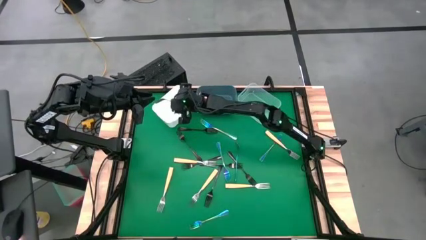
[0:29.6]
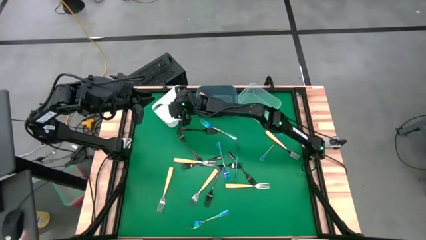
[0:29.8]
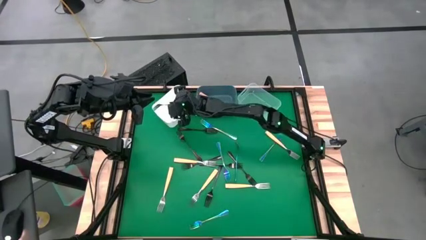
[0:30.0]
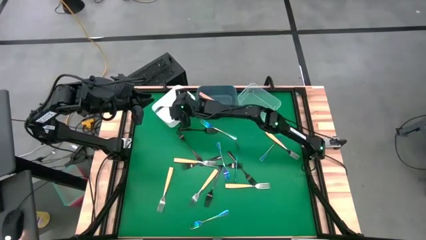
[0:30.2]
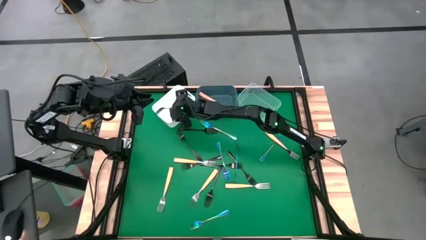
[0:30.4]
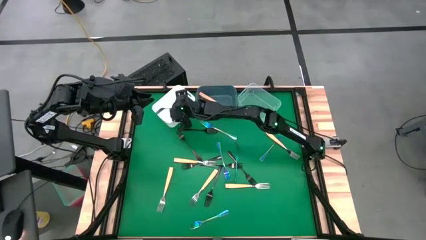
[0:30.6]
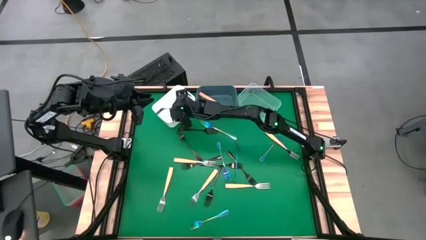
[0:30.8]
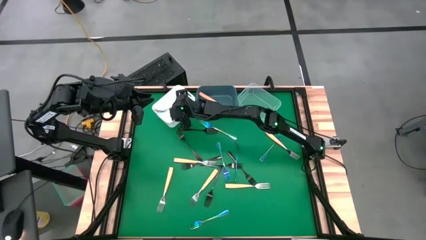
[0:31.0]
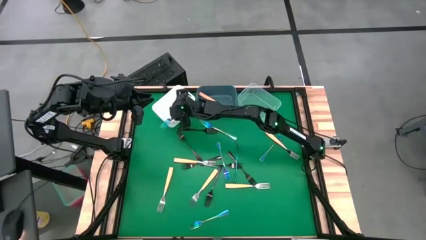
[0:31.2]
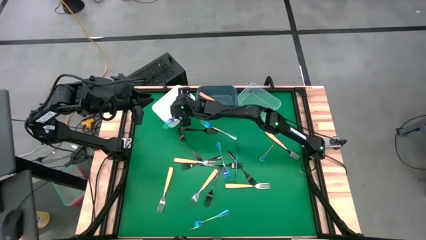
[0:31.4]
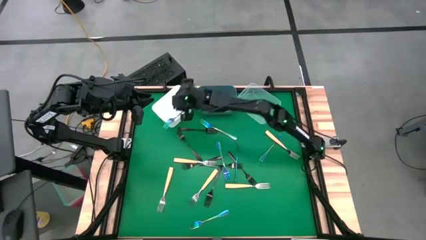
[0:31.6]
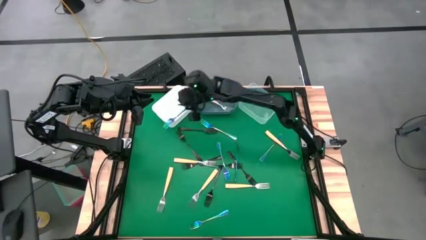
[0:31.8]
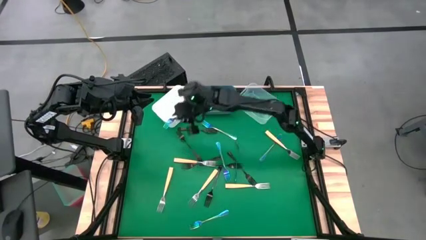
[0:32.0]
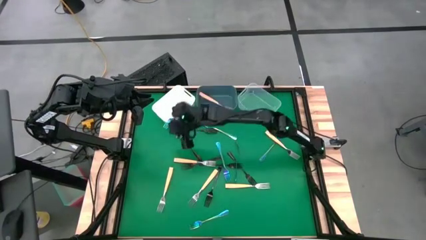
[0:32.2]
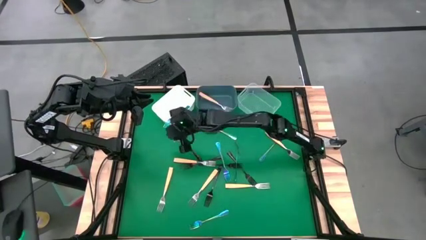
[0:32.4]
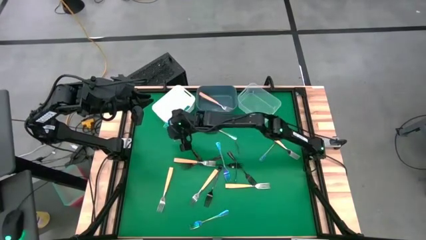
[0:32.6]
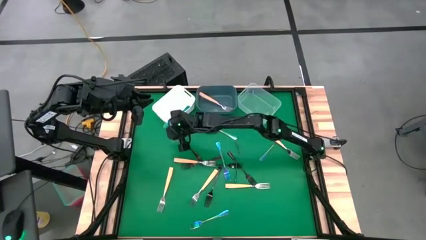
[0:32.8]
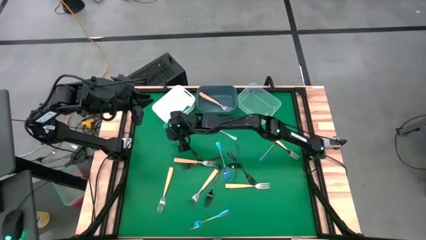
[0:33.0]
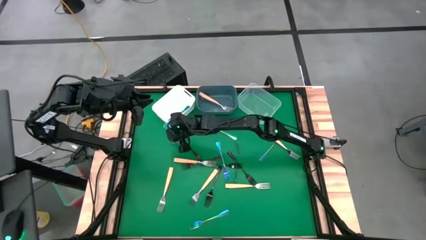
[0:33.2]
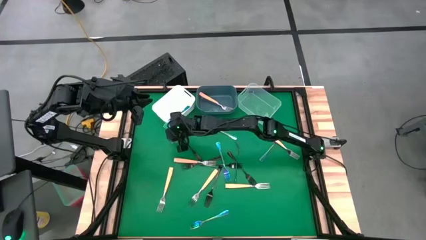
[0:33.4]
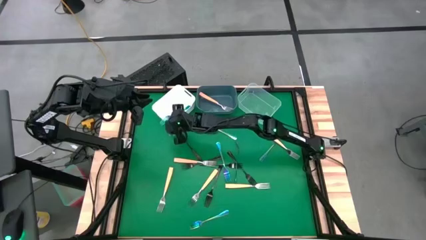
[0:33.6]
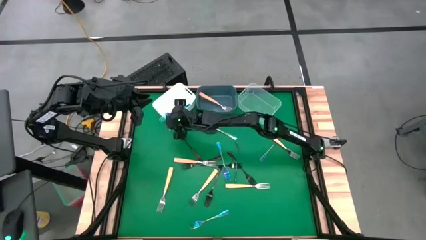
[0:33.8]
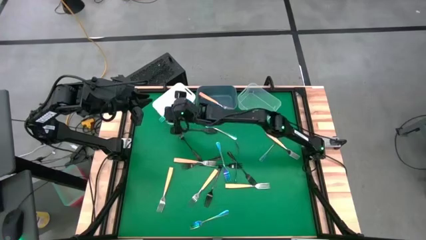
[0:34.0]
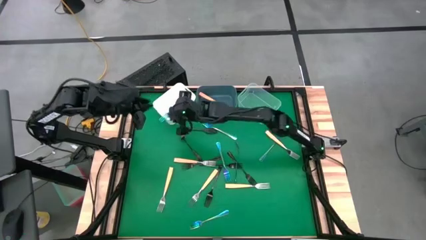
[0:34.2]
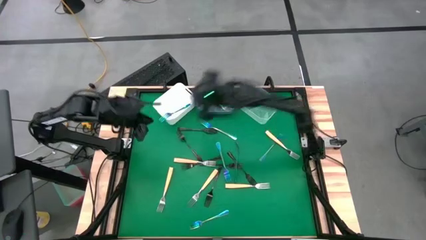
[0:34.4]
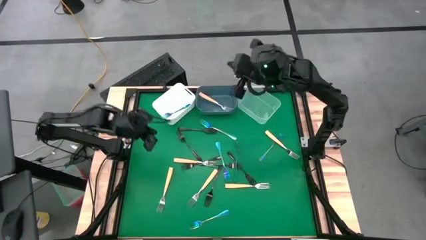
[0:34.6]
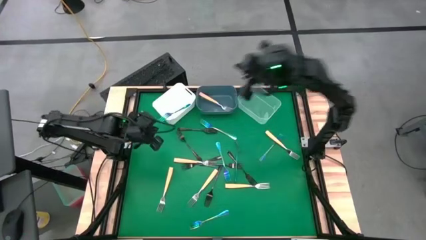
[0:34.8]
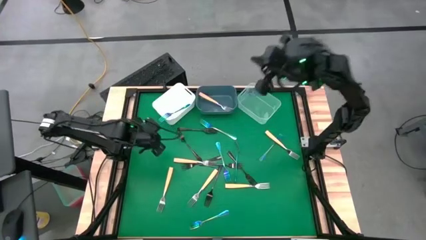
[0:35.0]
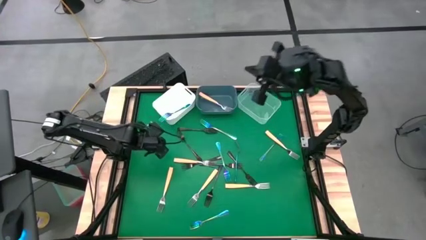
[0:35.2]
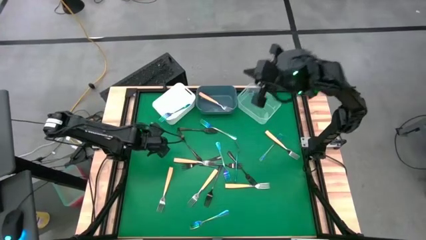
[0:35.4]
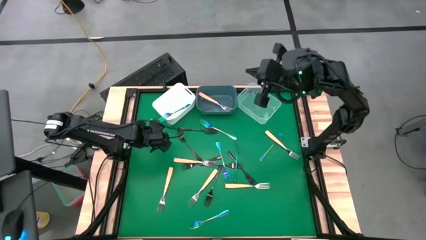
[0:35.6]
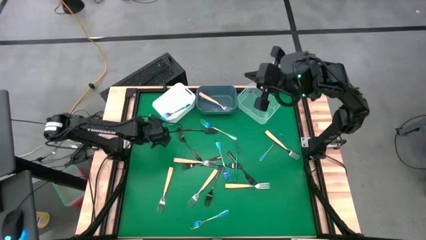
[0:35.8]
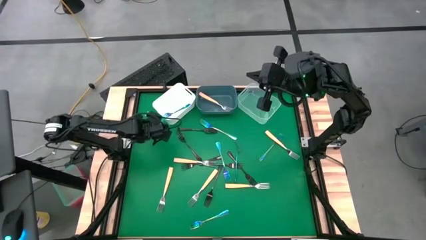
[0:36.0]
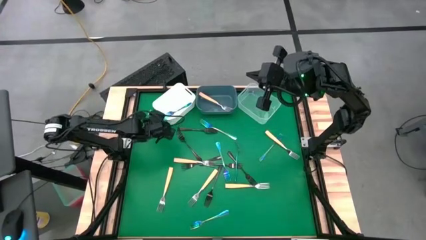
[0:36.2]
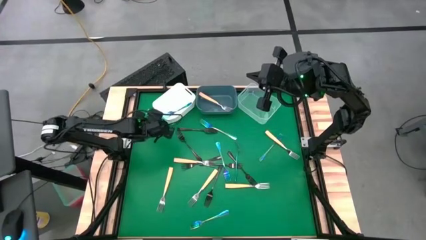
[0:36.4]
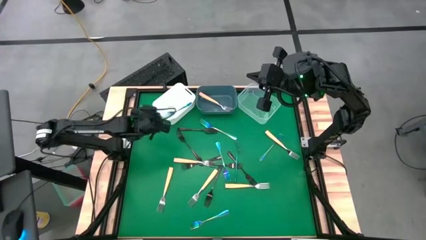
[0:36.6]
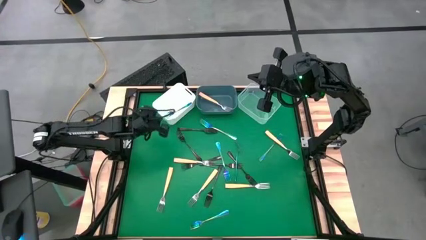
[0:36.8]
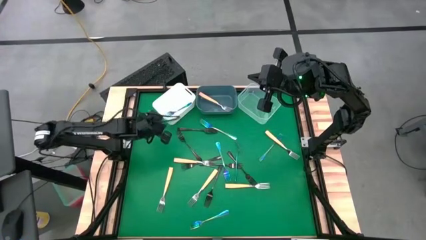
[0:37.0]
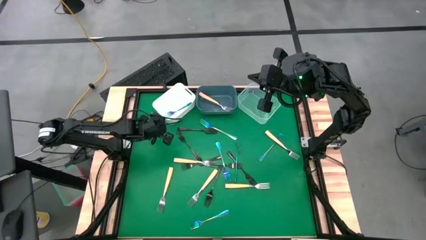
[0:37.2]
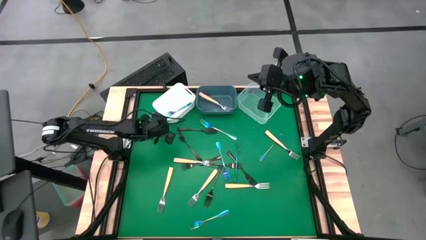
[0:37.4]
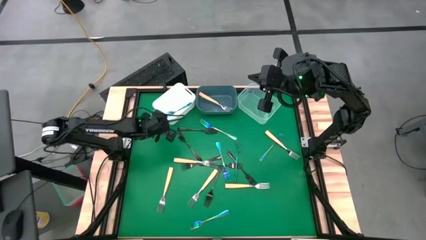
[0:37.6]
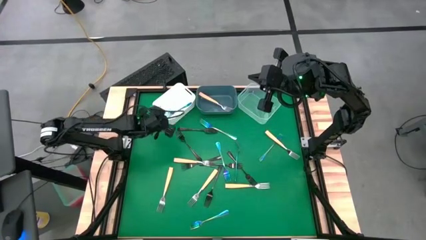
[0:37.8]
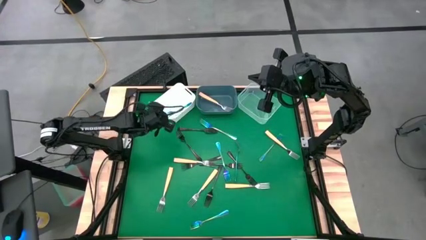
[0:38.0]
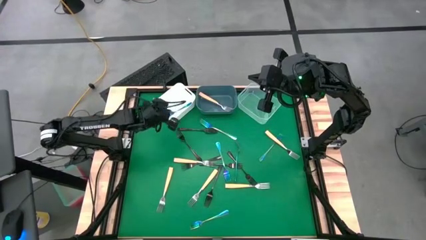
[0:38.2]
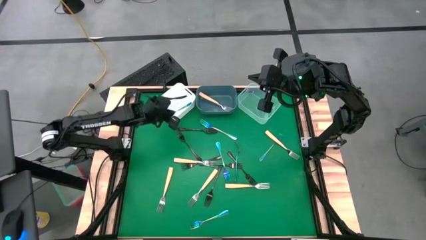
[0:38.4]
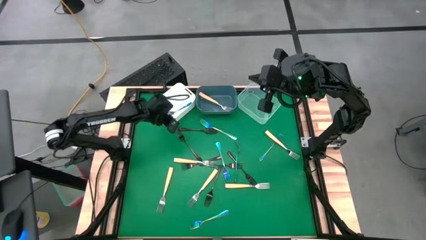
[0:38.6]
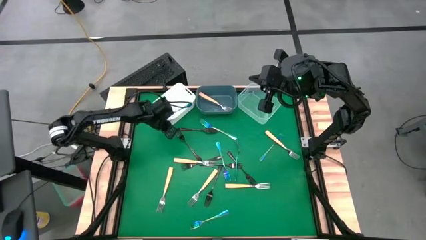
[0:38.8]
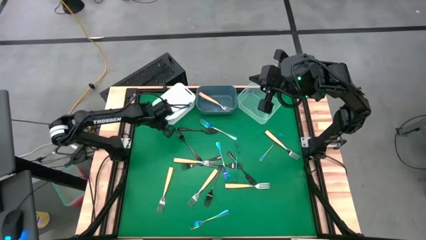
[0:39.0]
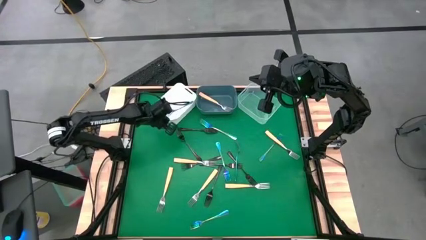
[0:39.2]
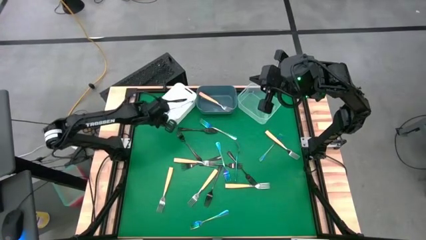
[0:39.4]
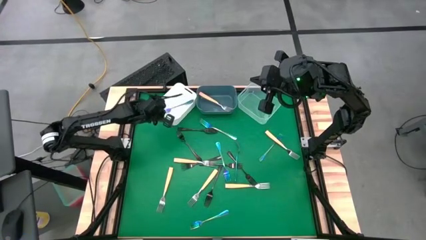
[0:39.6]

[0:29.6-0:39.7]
Task: Sort silverware by color (type)
Put the blue fork into the white bin

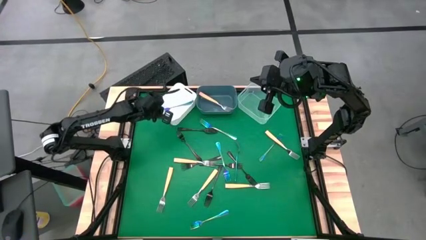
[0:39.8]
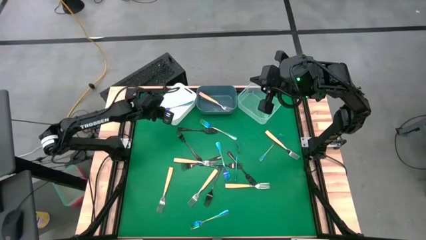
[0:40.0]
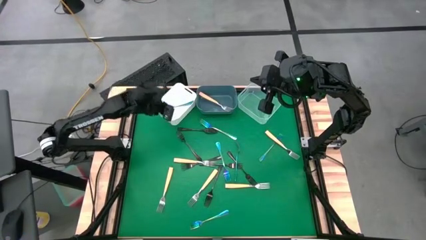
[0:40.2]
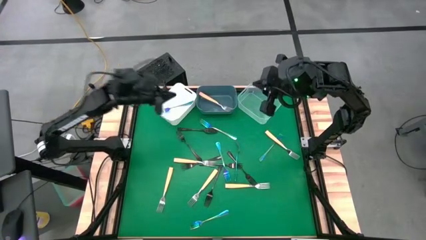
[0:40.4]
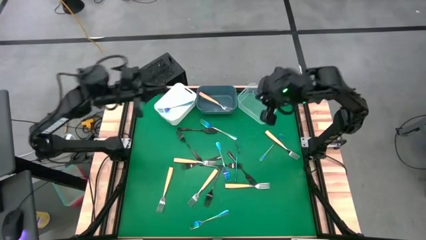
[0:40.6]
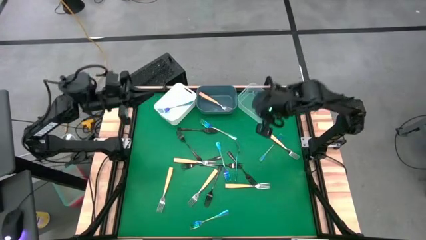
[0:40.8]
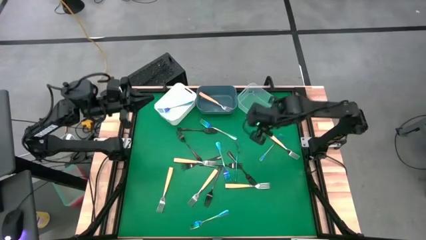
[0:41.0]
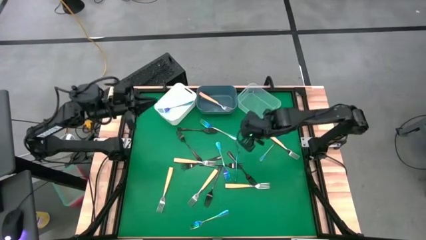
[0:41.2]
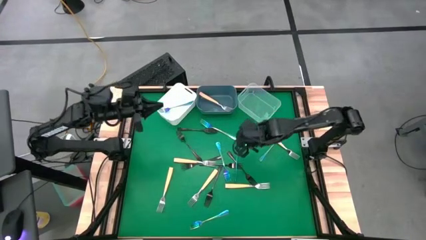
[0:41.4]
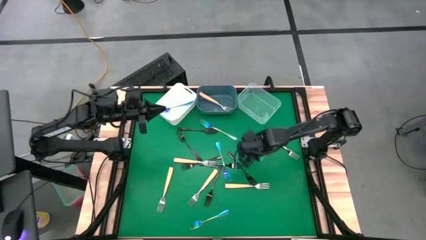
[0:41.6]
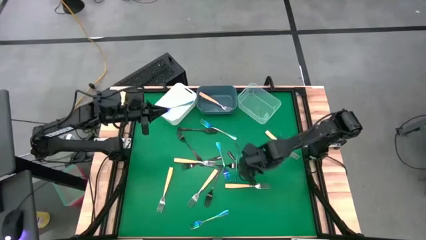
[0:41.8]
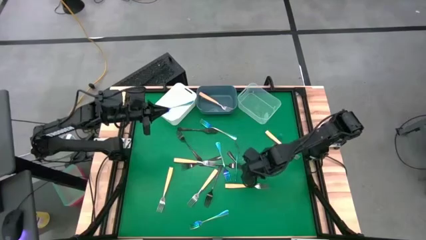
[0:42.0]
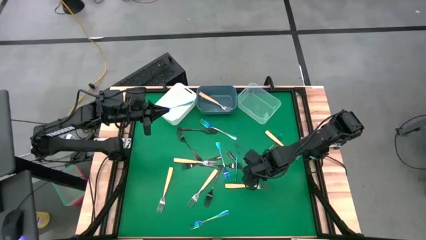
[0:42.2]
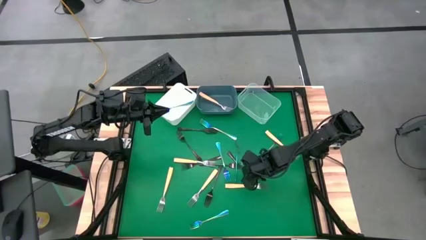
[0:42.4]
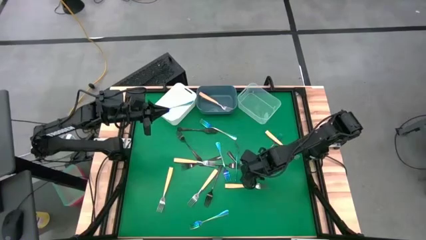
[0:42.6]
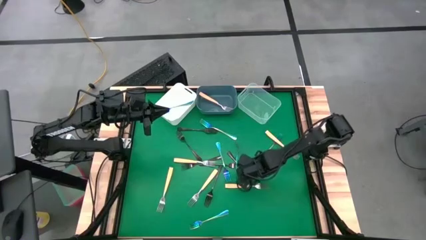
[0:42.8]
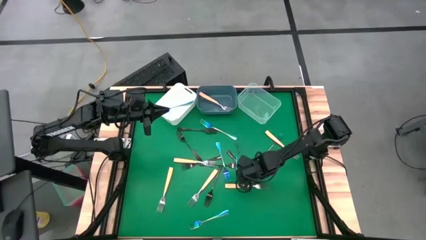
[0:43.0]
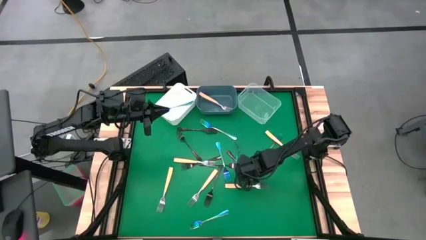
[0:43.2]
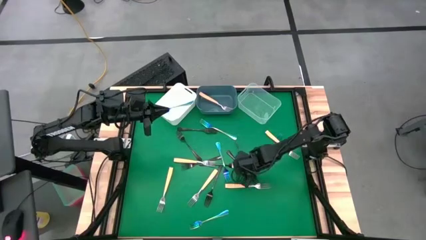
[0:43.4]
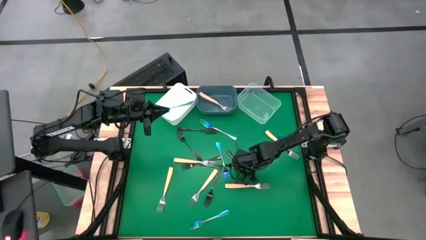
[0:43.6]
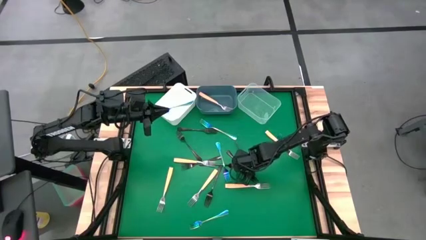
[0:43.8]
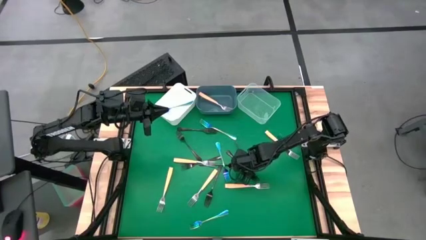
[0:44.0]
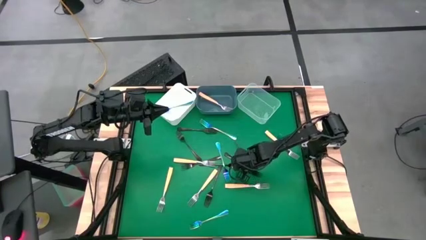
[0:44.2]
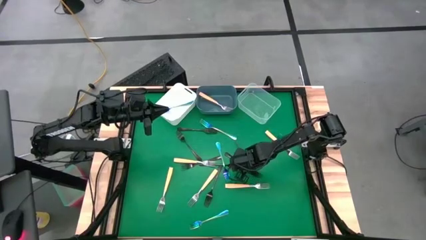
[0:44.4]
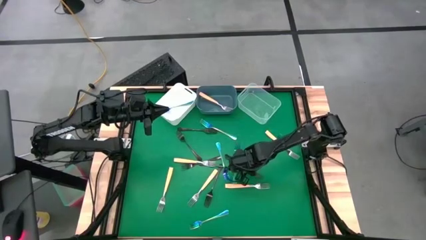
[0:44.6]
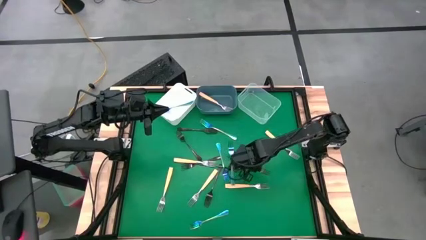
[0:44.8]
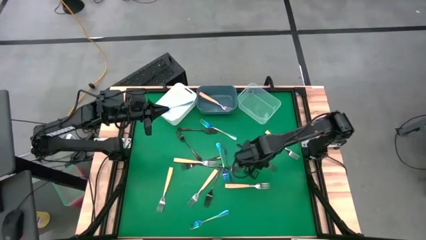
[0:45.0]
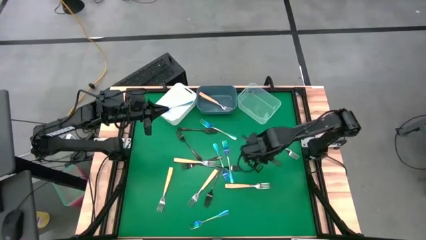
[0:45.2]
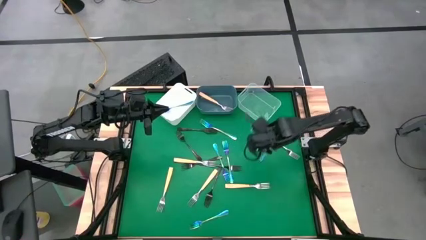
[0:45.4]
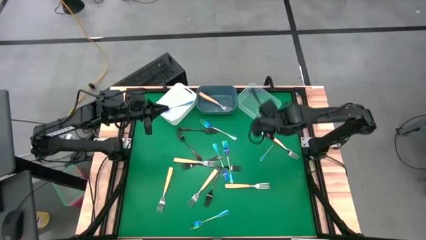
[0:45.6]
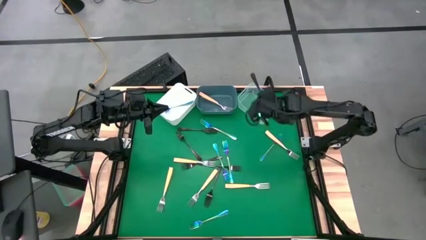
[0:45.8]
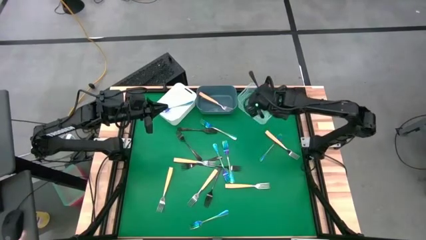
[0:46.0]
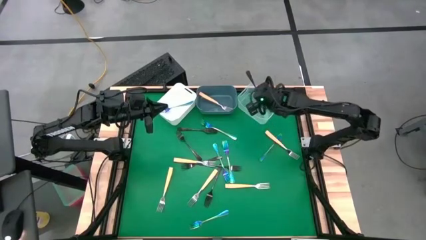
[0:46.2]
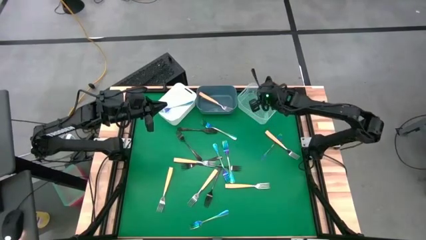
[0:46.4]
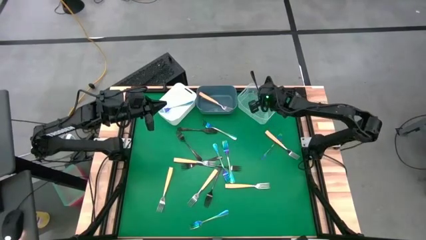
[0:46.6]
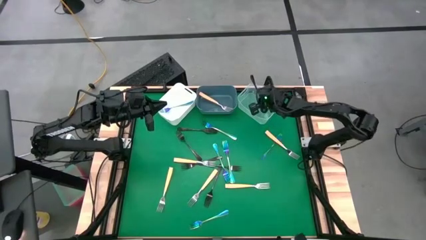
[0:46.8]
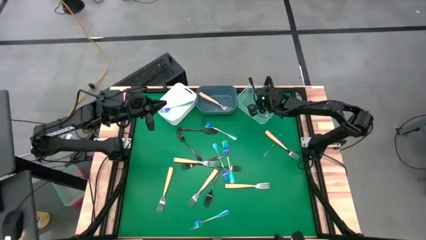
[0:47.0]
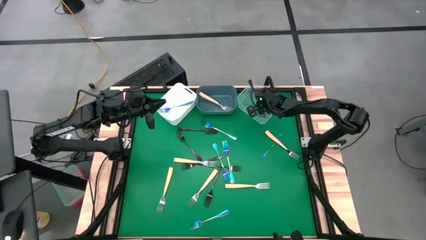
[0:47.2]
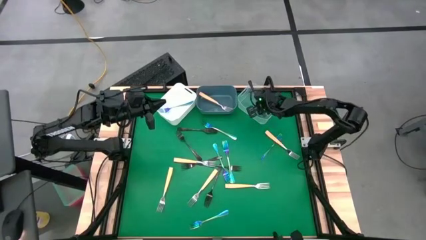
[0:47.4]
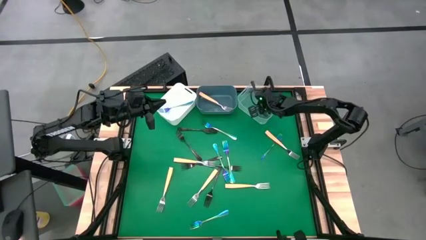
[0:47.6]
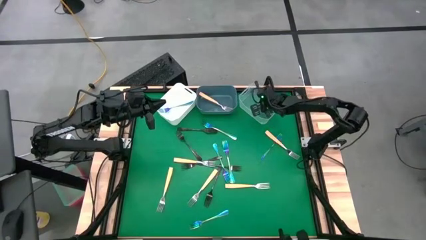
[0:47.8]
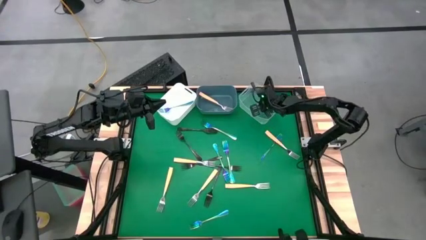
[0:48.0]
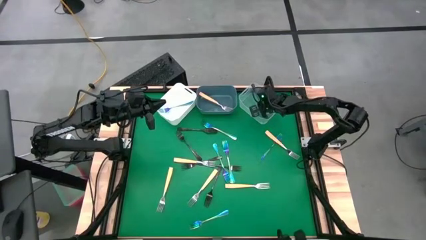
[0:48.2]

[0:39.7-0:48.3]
Put the black fork into the transparent bin
